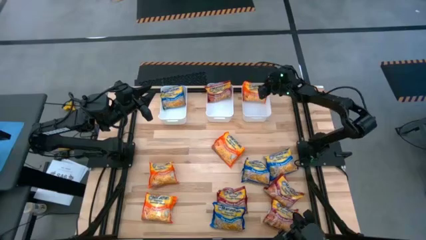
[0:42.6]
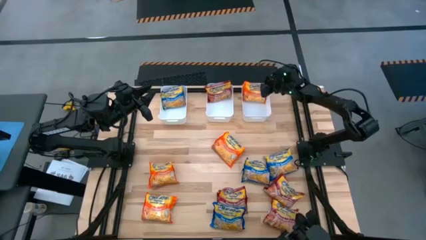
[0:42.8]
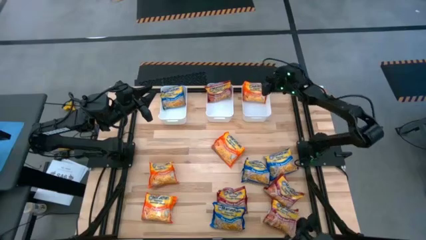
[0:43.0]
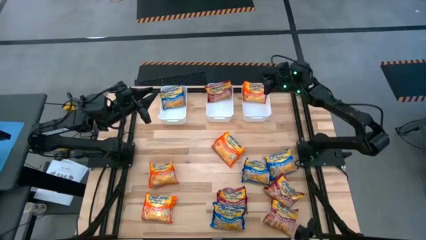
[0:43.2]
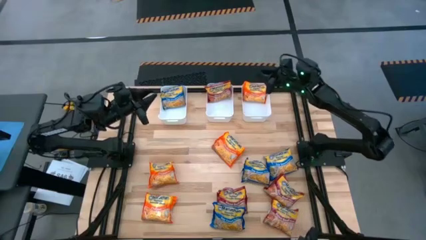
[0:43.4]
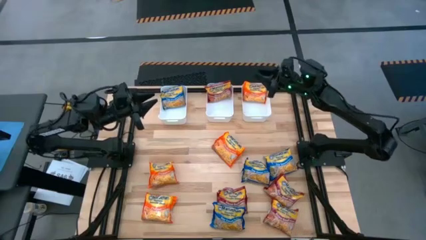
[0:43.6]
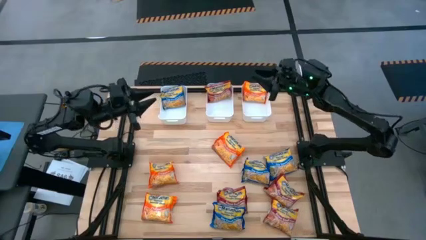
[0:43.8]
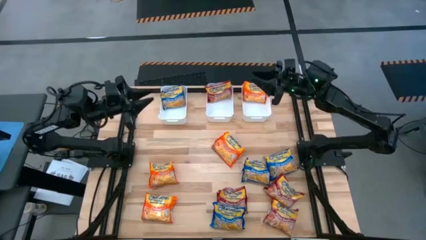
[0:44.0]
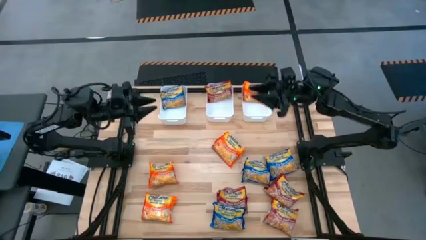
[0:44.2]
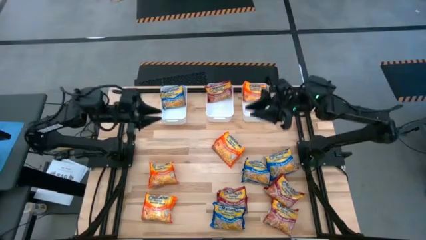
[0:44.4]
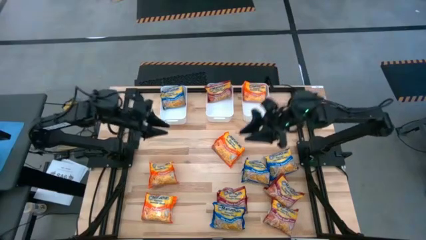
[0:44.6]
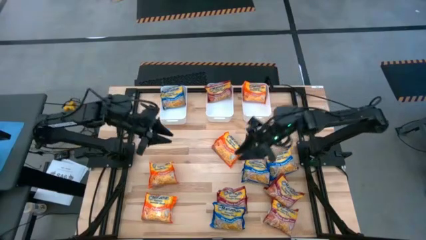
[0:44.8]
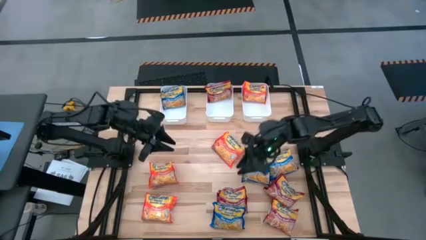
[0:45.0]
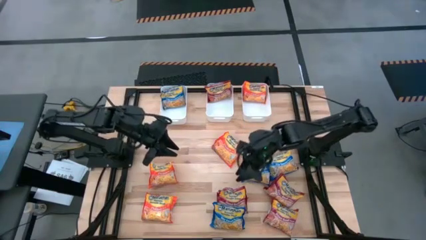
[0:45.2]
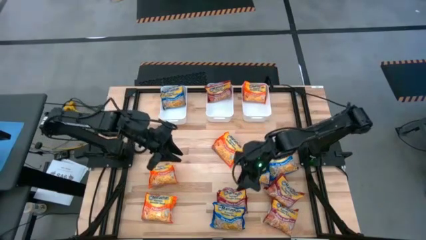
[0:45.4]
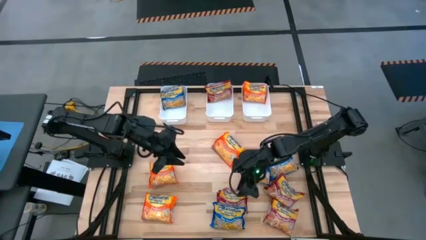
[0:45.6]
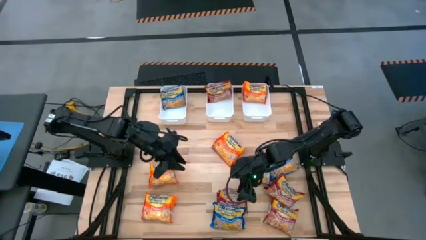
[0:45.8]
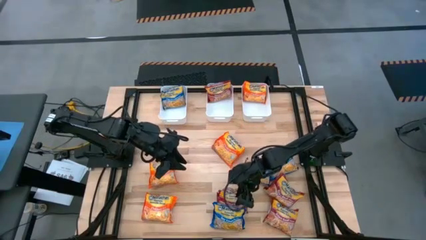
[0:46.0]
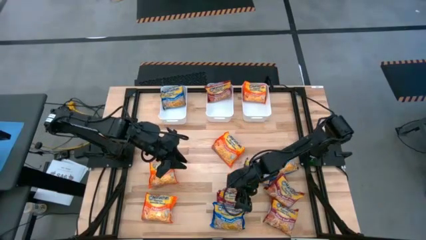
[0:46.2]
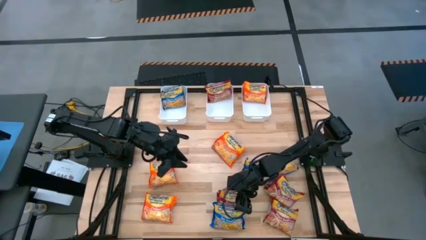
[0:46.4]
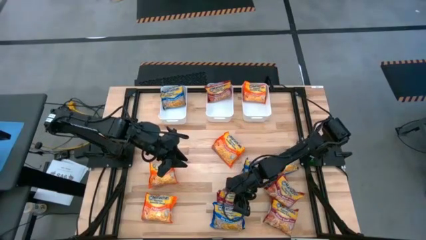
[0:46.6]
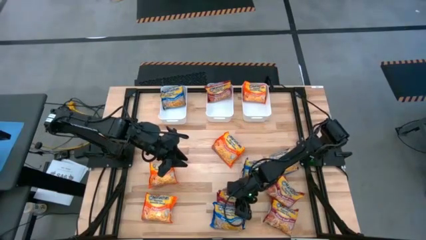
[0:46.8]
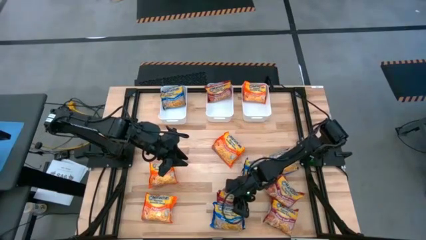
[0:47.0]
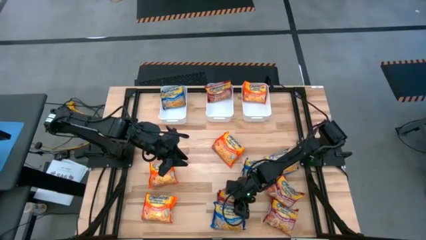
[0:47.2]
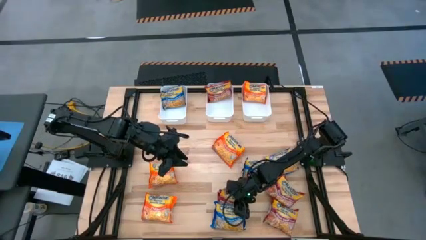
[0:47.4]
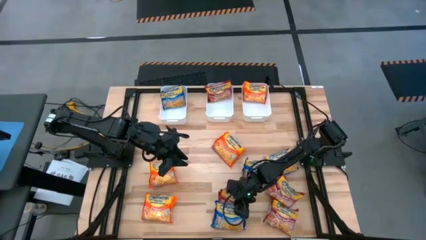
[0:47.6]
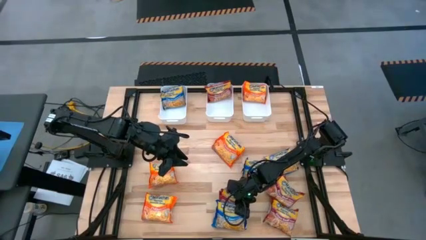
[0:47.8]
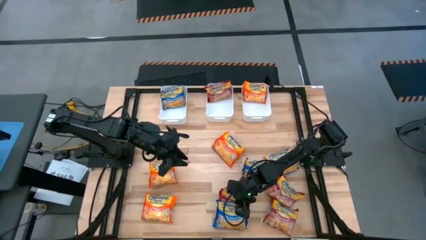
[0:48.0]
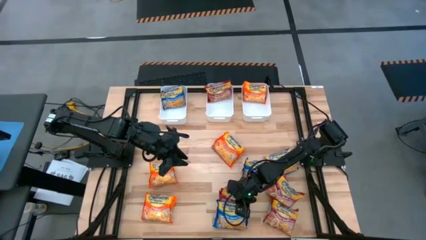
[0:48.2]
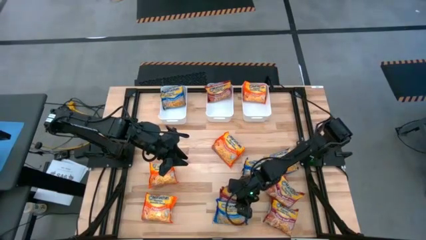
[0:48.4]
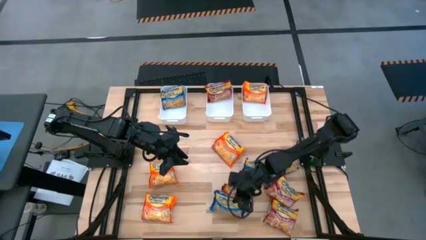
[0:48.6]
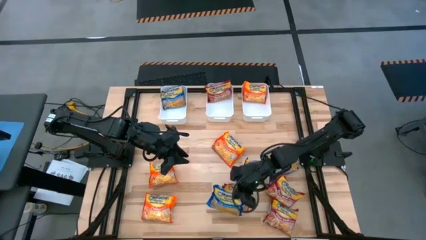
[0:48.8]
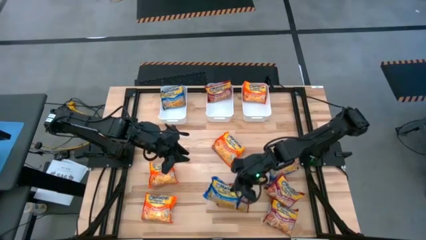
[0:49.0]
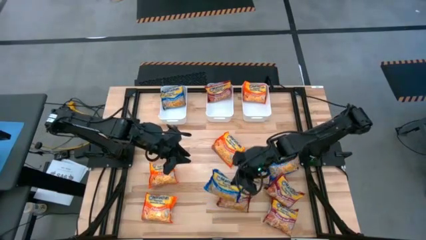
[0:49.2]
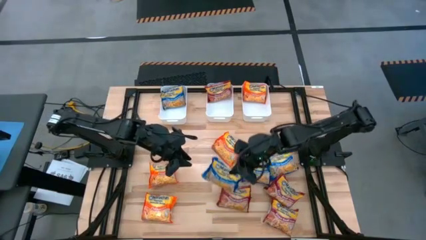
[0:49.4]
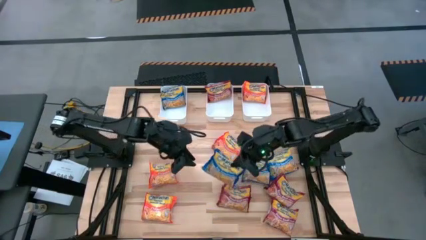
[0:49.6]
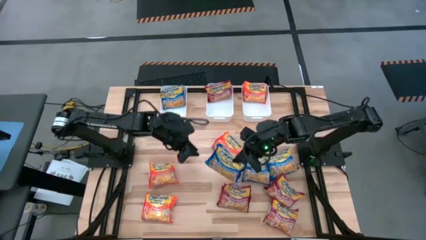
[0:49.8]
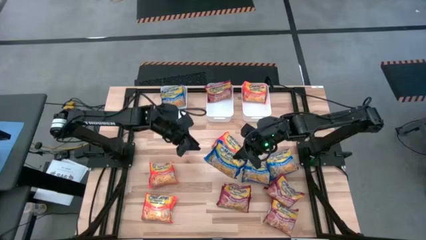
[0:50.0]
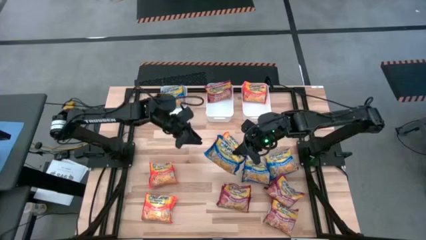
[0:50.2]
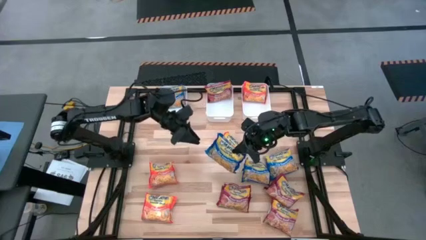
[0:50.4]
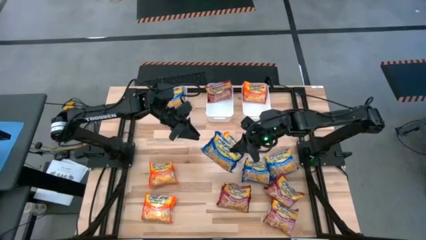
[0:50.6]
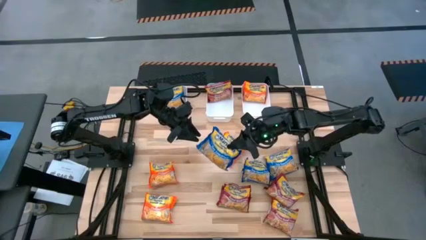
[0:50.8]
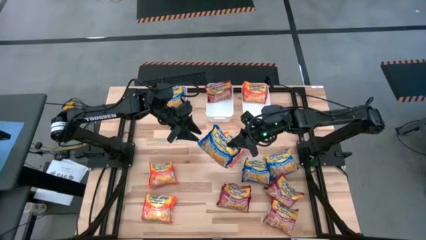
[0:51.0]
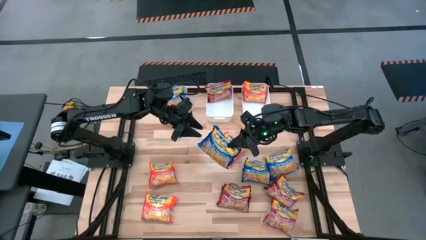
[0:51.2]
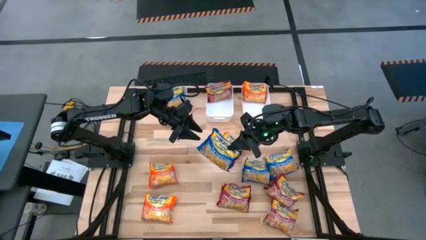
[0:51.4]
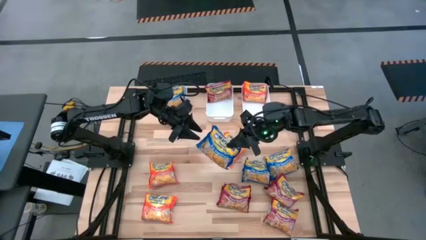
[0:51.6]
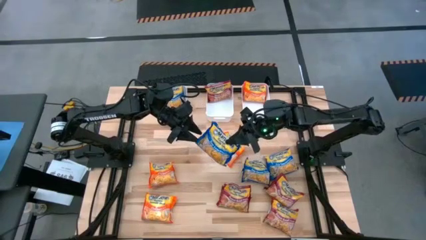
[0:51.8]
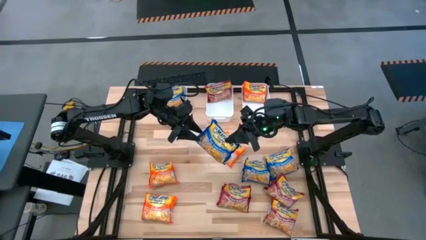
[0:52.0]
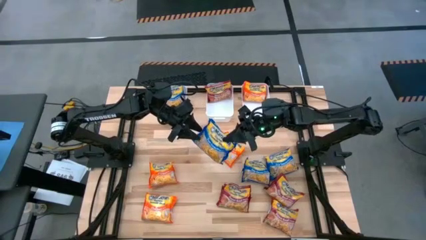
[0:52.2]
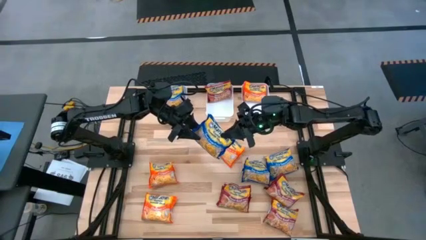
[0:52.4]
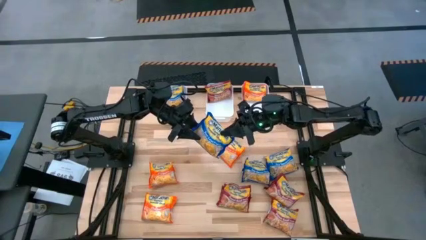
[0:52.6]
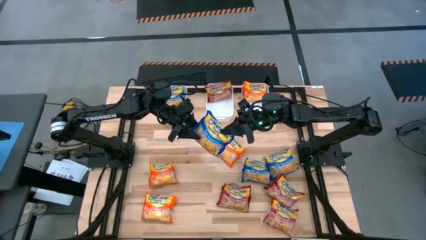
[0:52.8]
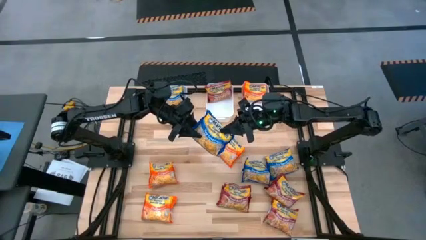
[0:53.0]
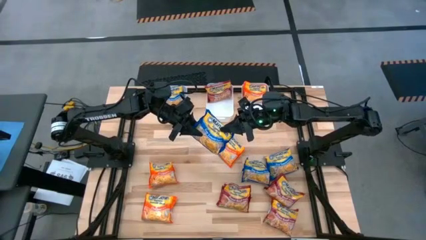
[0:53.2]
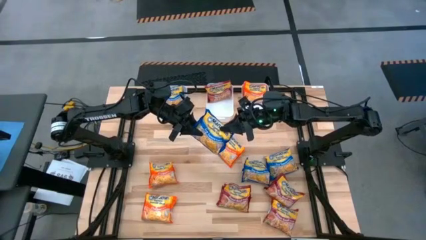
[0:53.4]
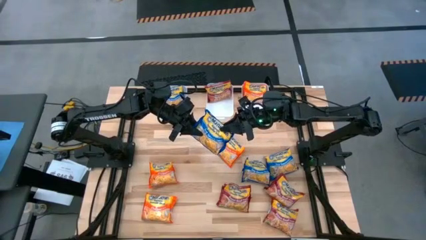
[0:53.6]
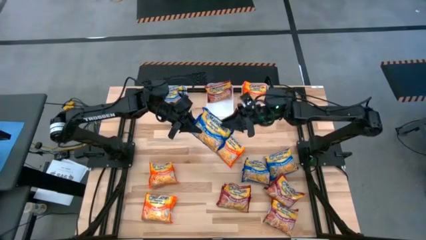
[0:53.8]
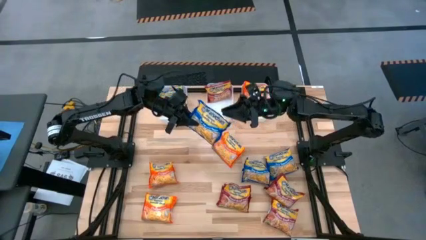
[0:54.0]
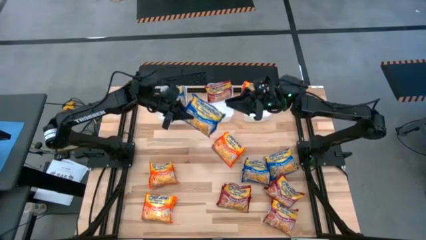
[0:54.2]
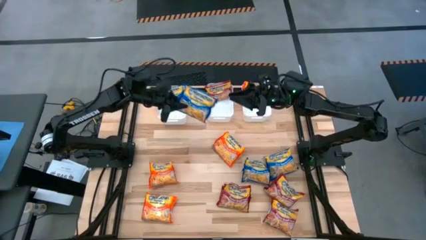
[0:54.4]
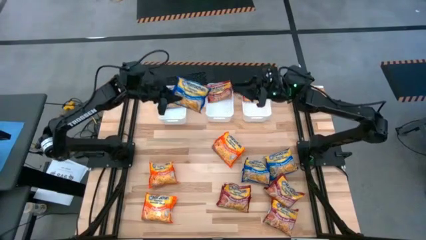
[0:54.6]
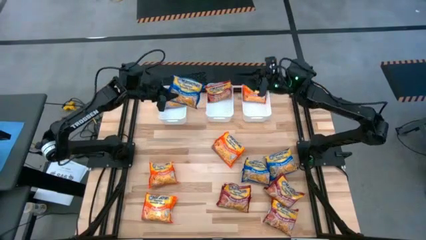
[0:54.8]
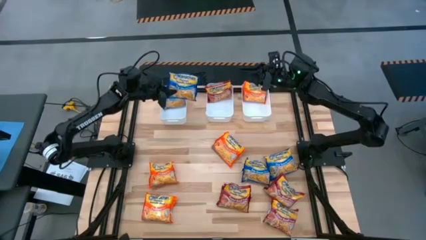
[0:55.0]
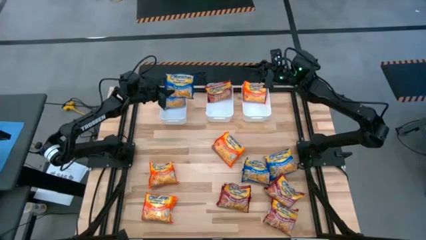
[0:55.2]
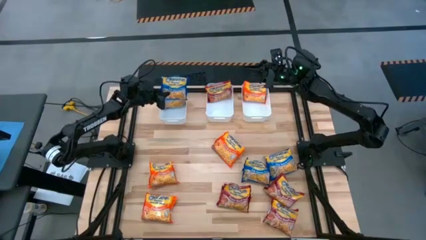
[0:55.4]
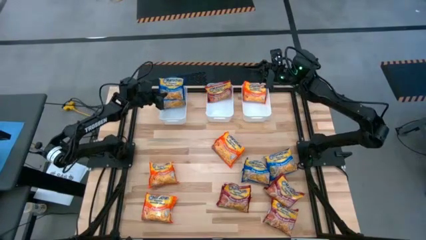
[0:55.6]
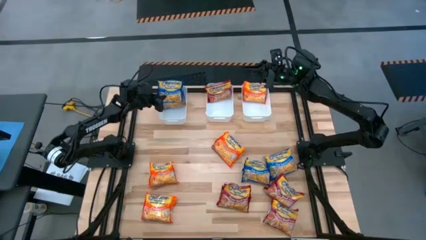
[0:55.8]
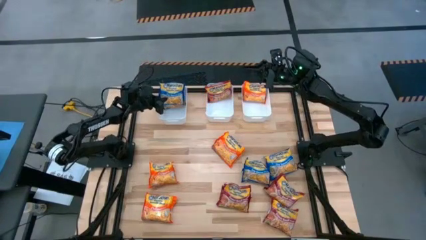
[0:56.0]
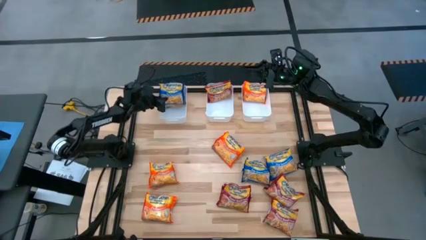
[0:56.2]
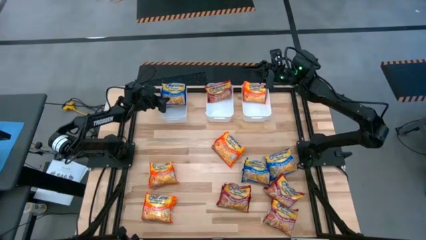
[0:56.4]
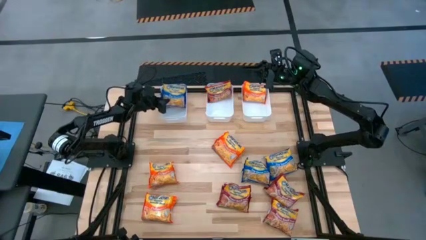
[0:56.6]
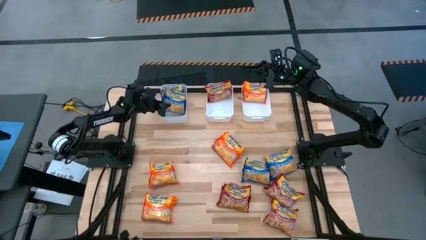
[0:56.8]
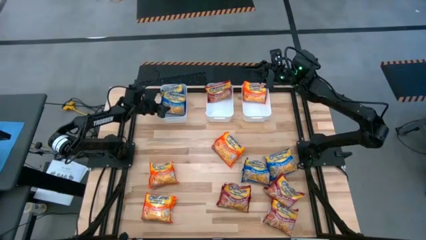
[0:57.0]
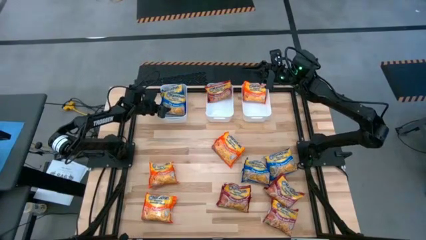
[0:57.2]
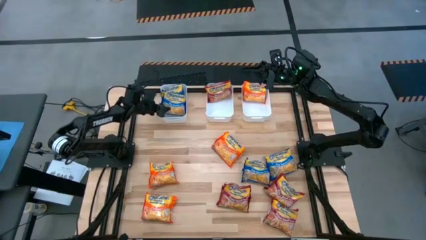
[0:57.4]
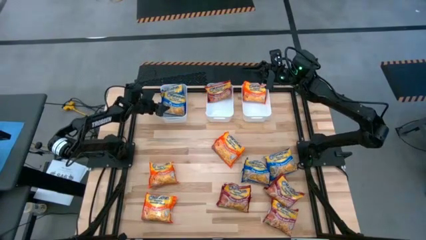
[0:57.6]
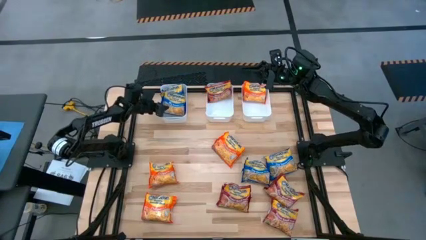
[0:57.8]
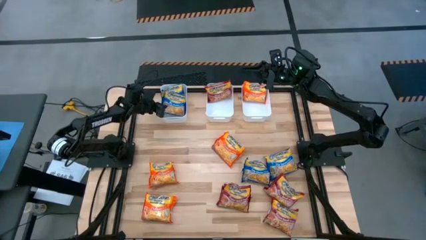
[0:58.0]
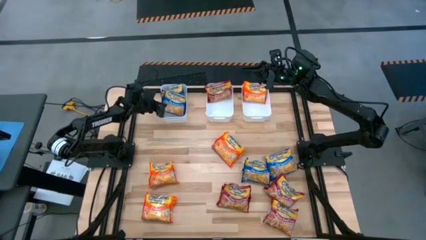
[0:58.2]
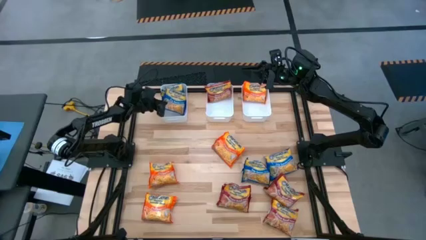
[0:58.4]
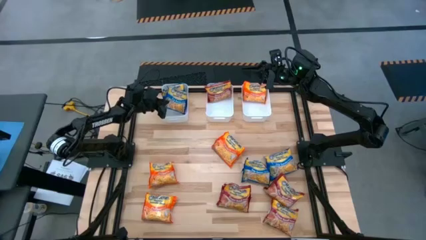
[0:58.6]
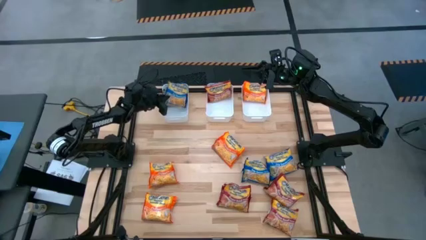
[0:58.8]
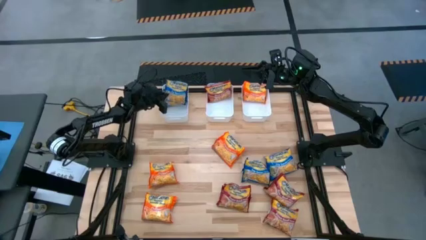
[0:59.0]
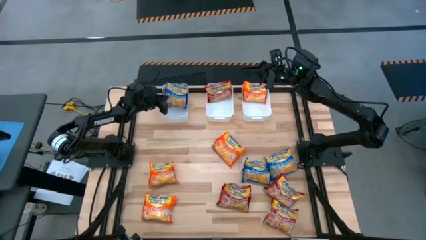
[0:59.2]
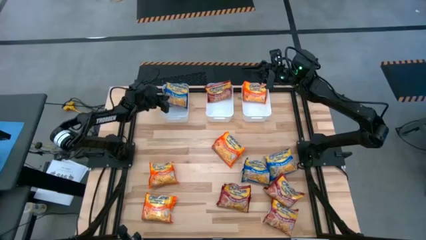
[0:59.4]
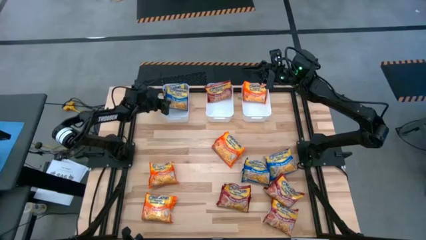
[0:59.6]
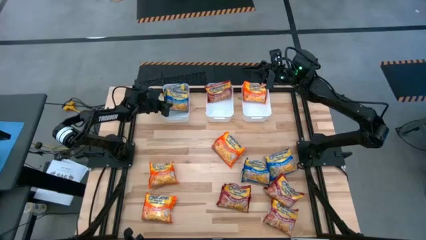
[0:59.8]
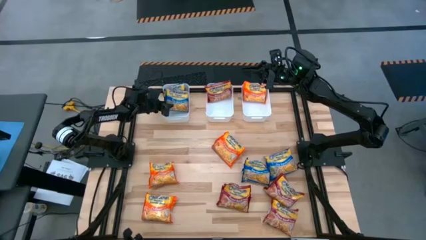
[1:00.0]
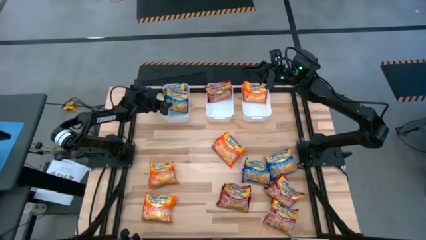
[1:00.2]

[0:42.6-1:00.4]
Task: Sort Maruchan noodles
Put the blue noodle pack into the left white bin
